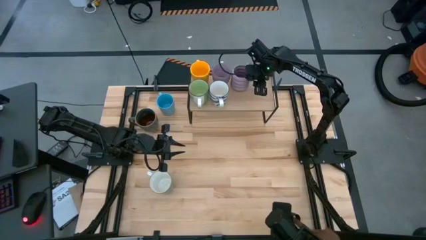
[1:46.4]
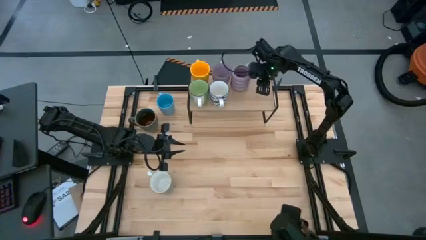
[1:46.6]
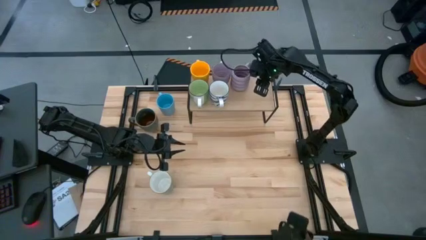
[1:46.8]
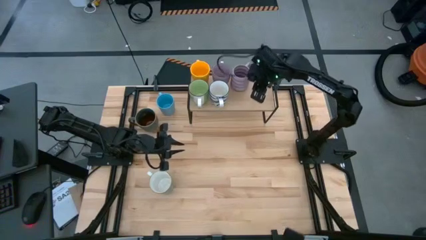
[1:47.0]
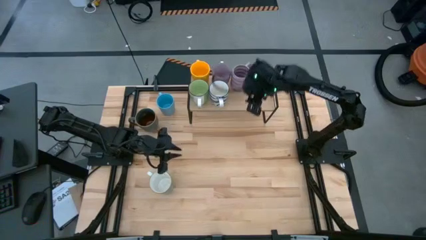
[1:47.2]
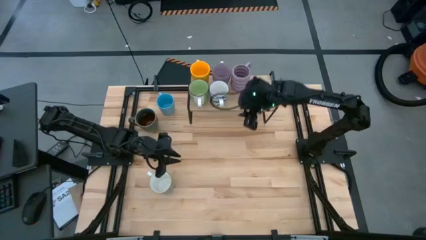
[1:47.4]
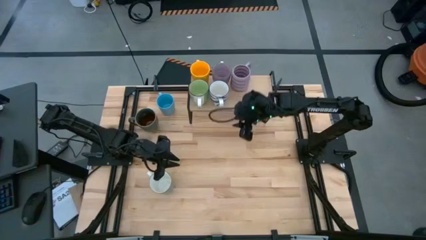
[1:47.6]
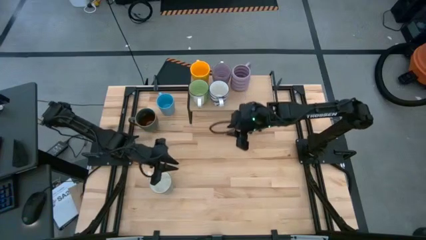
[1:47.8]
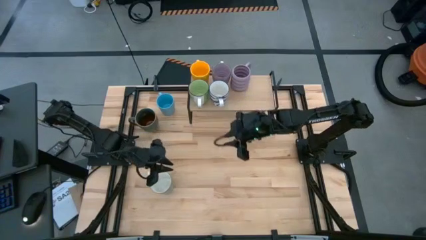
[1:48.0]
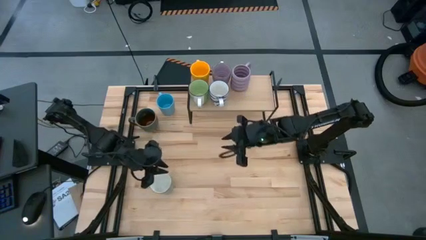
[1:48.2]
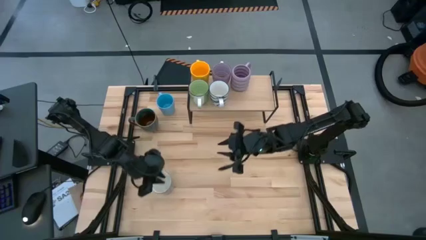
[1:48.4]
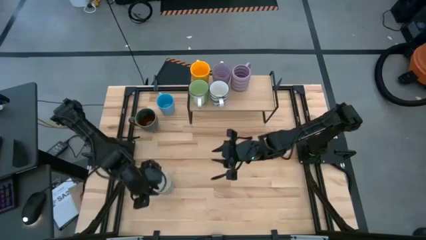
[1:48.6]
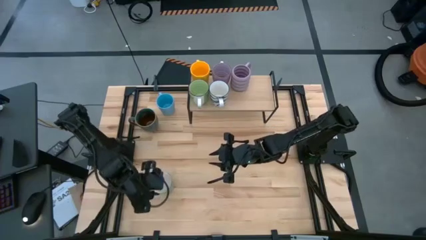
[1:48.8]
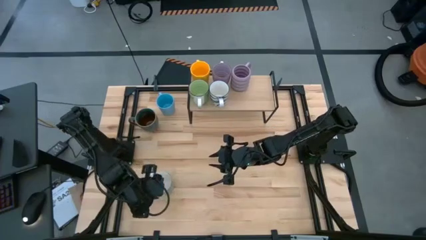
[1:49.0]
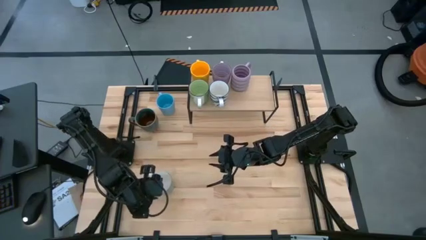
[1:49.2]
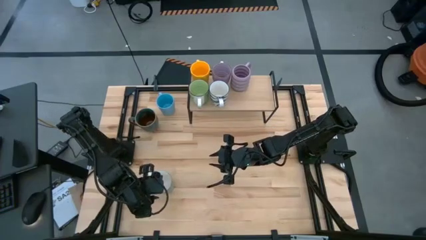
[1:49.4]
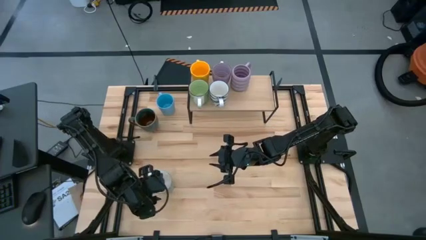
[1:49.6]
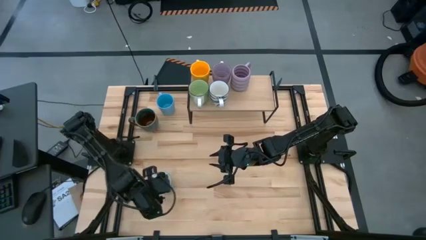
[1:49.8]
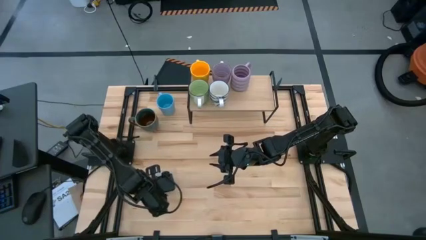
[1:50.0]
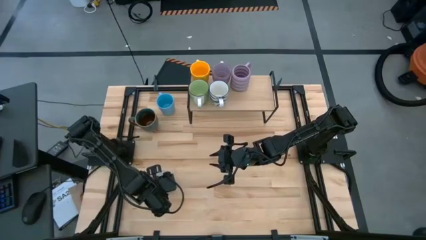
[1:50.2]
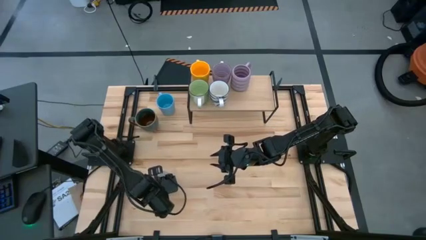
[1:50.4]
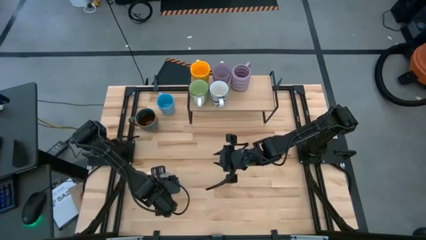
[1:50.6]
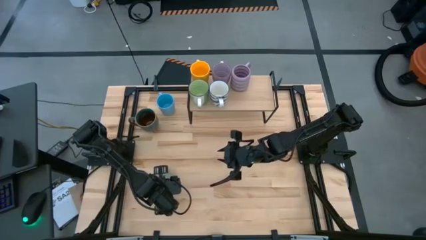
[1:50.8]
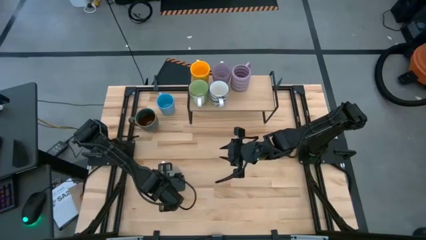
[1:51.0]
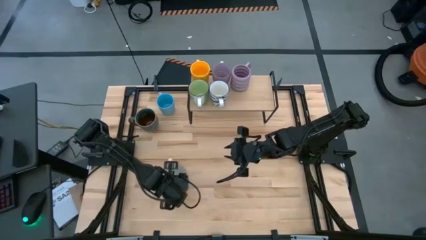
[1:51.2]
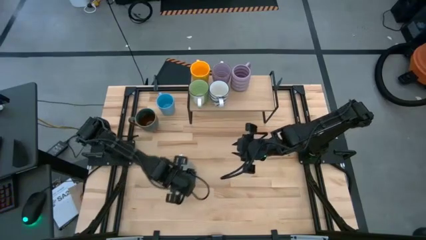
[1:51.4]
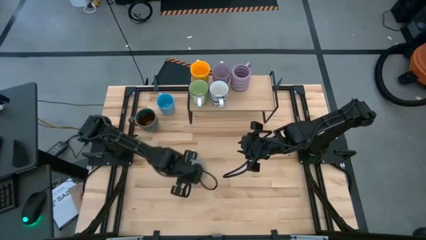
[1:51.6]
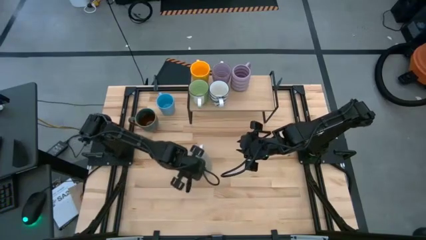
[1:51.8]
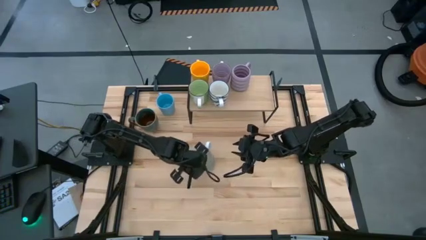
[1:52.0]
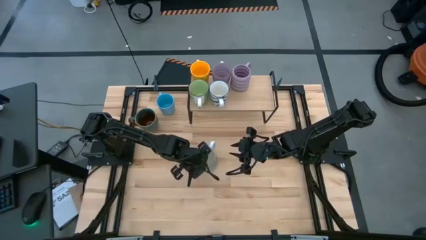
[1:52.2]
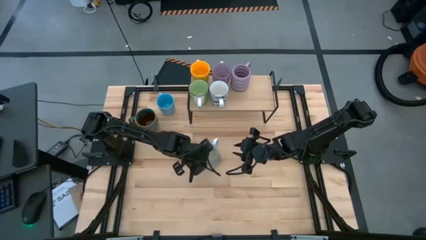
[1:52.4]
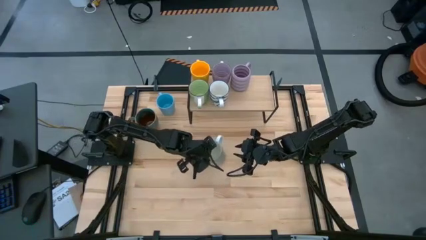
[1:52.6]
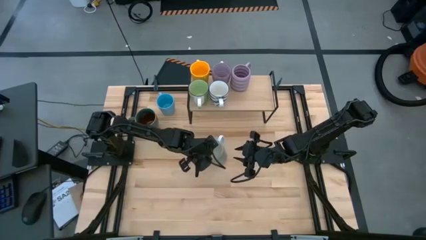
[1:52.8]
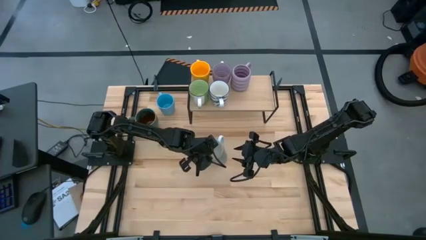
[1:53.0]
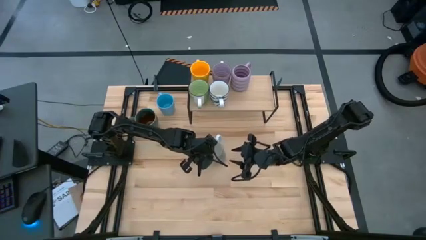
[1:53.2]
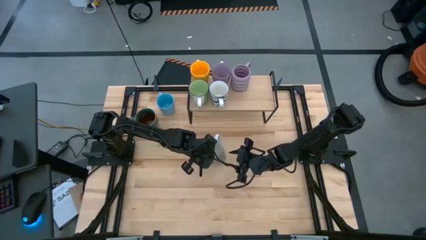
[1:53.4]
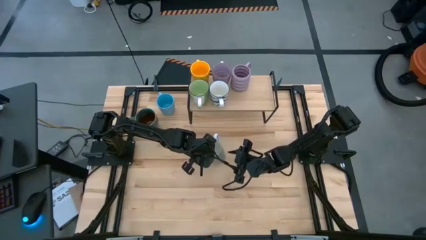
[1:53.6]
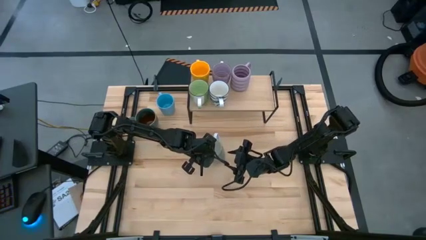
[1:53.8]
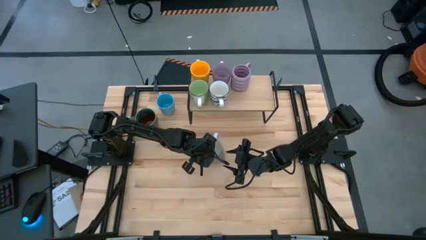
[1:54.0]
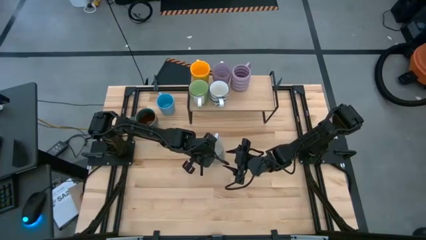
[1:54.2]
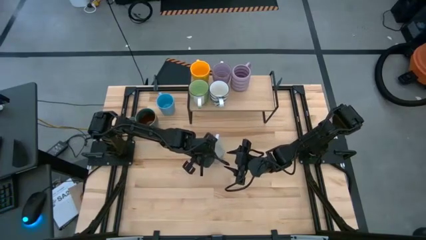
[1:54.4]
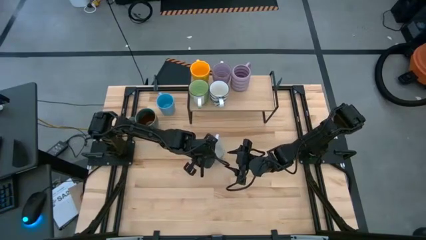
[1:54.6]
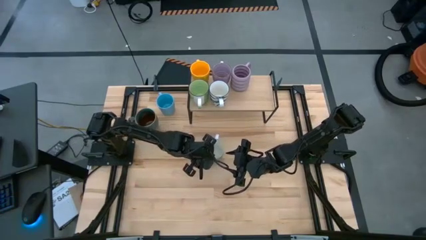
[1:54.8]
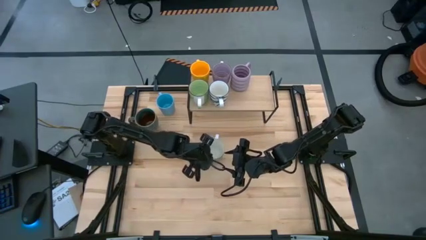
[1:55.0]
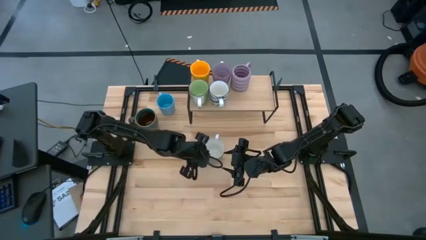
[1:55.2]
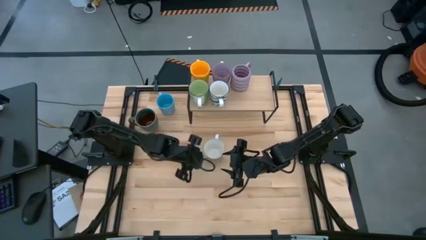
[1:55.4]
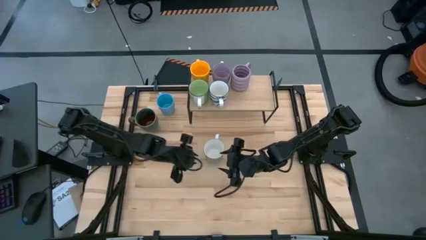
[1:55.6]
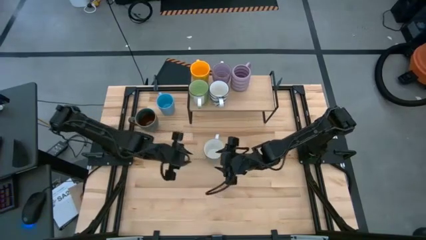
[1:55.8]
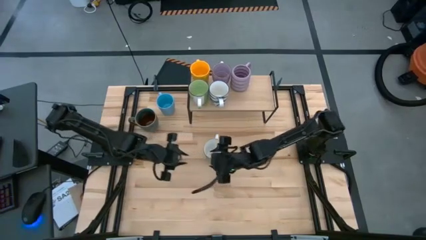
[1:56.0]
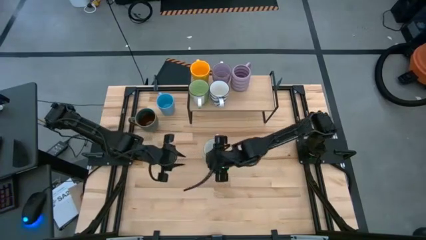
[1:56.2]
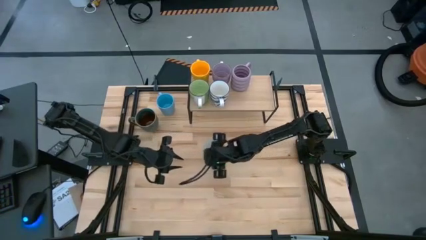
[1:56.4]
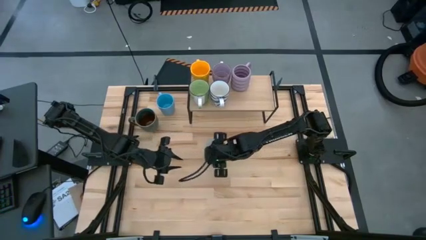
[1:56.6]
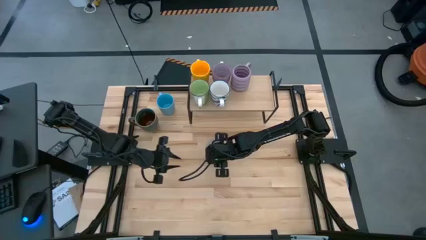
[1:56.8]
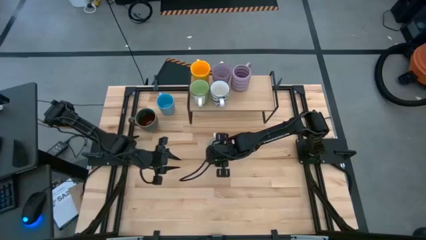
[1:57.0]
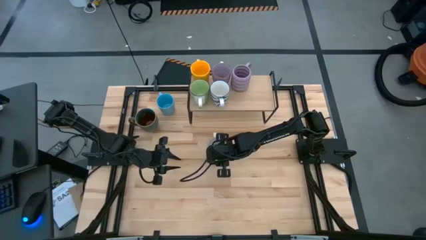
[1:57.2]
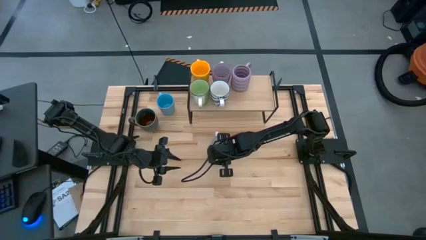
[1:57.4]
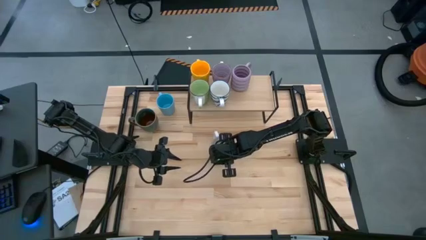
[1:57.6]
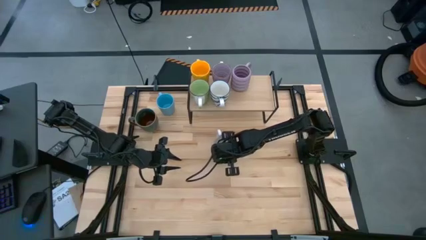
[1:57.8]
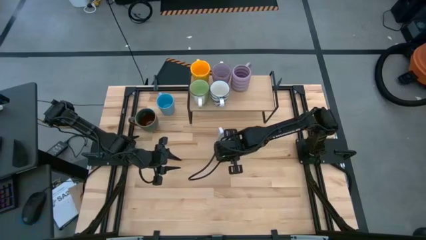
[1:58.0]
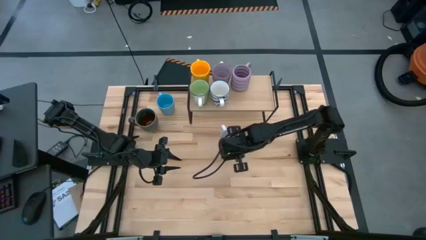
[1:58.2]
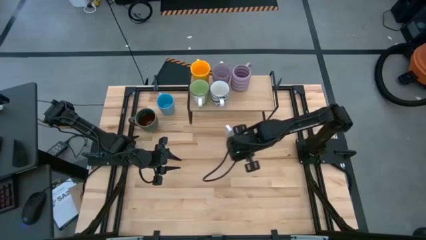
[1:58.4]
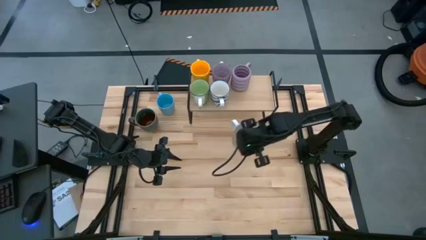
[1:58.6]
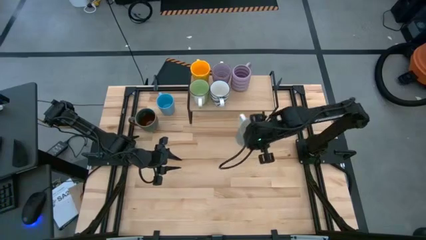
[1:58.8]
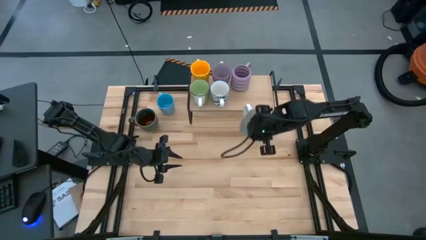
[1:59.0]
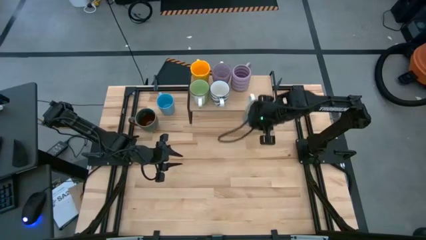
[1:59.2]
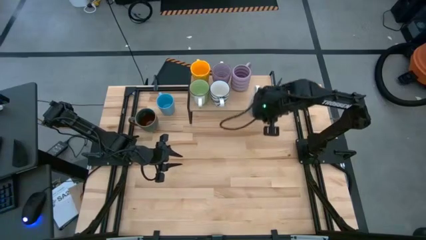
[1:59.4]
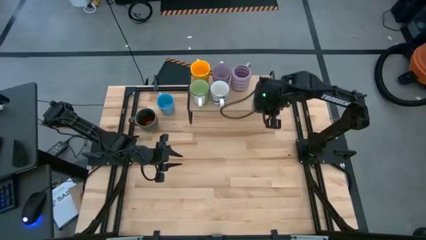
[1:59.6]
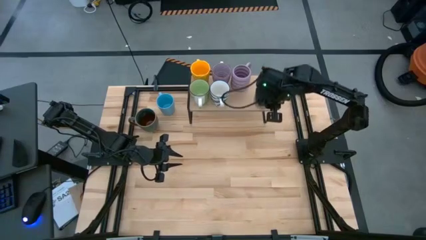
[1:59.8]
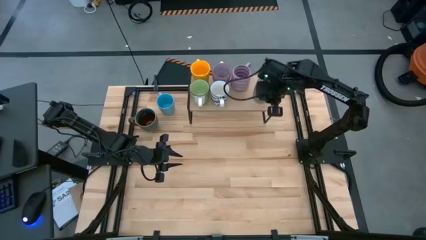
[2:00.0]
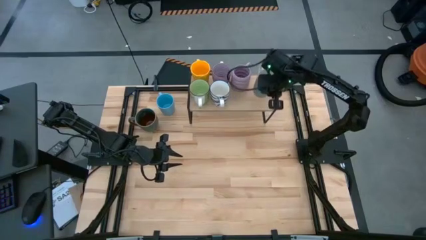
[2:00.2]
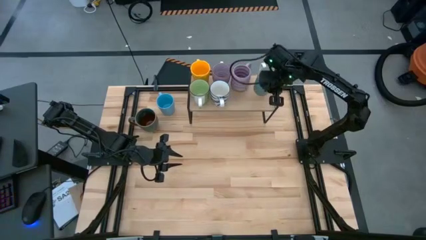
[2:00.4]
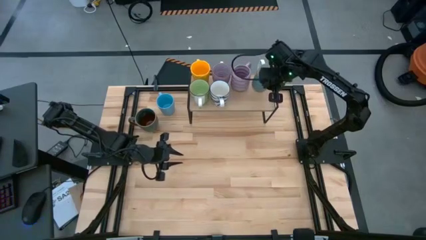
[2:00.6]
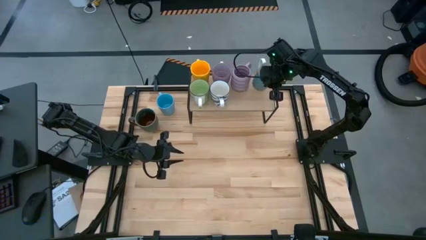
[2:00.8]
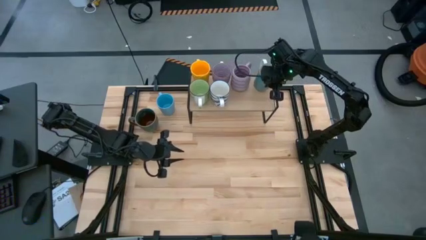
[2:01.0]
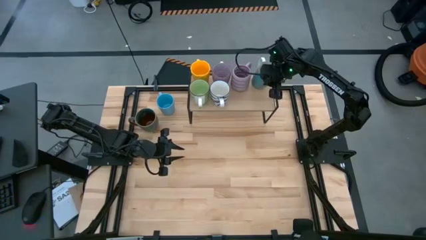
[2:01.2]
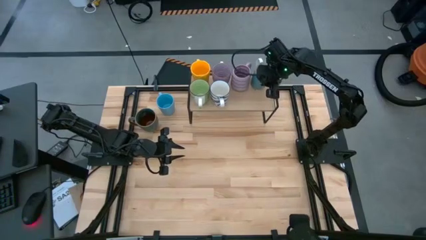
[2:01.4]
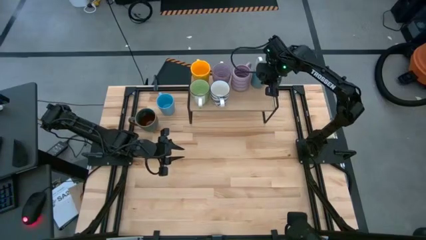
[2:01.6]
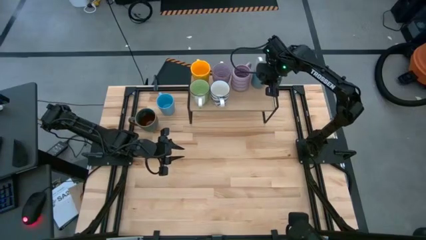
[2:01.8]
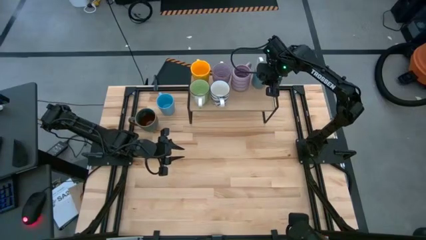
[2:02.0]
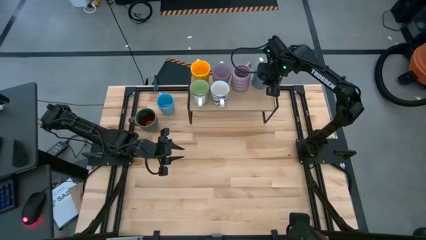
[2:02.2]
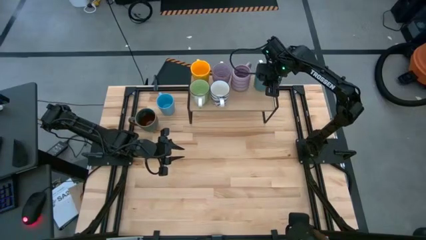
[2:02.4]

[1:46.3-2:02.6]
Task: Place coffee mugs
Put the dark blue mug on the shelf
